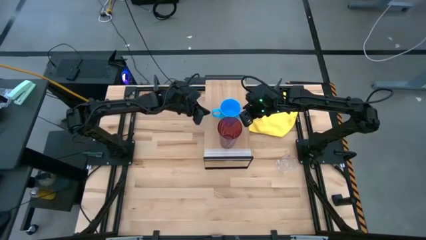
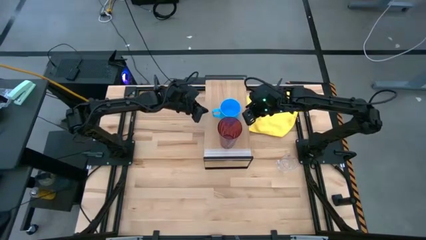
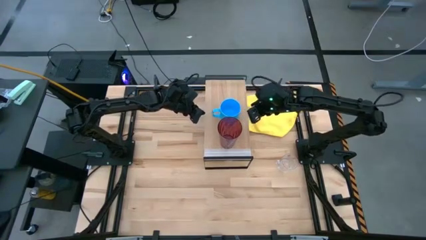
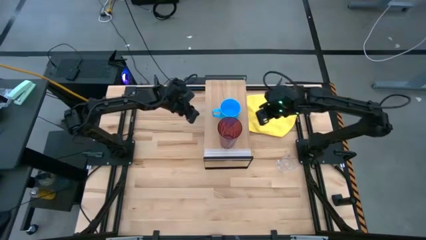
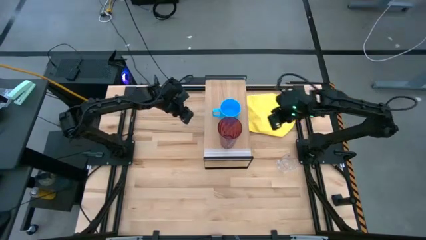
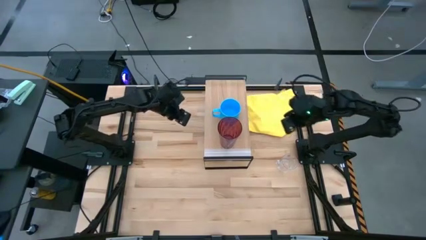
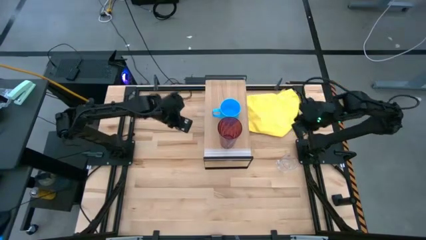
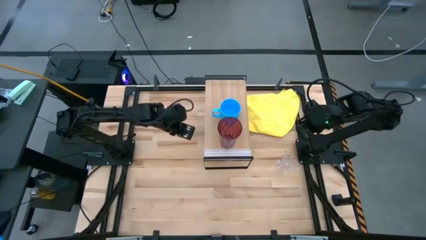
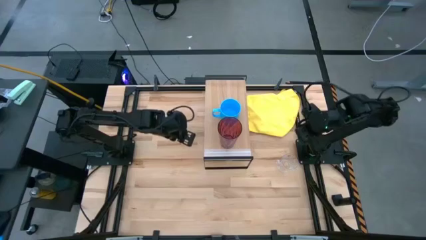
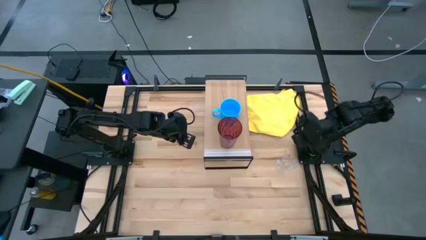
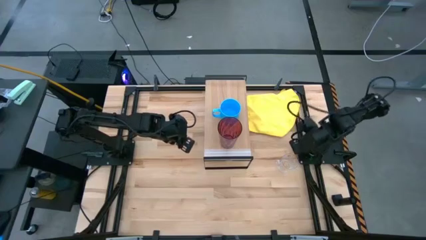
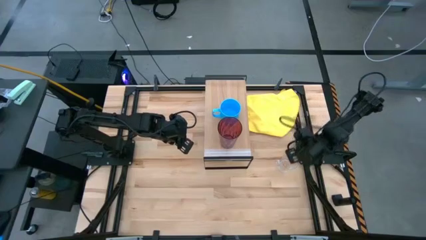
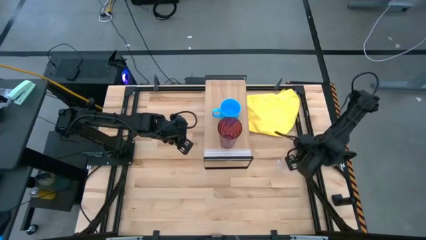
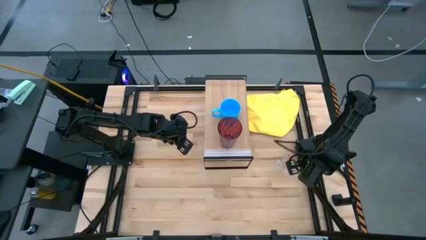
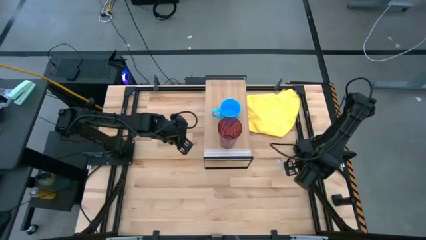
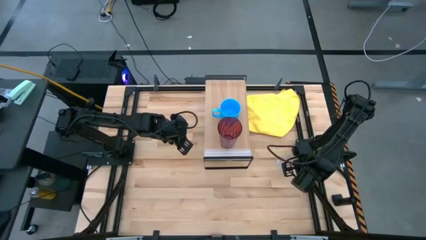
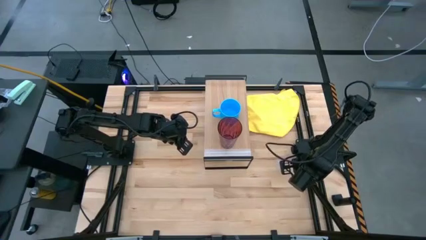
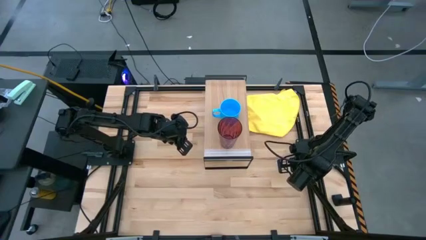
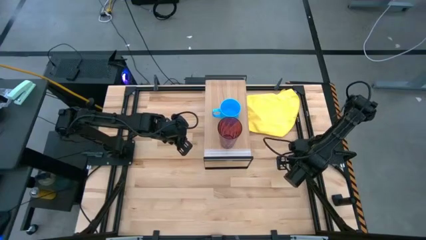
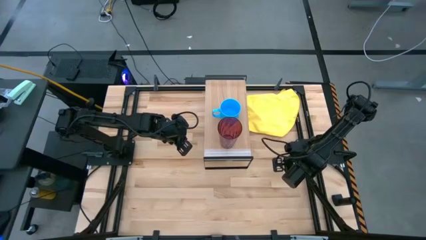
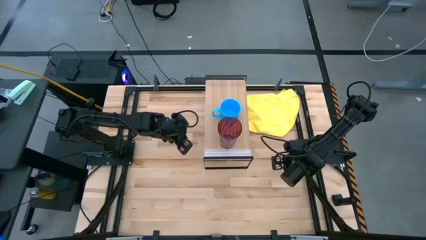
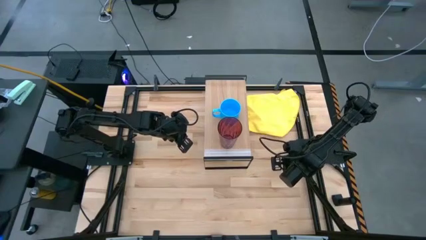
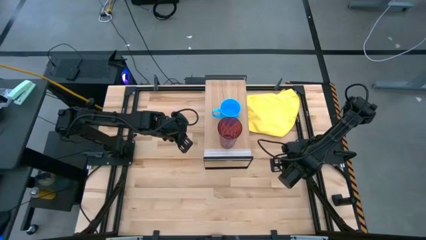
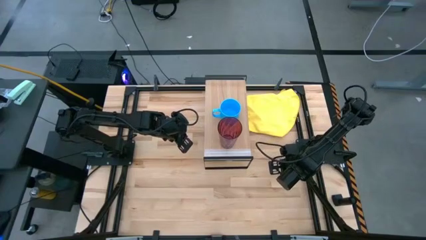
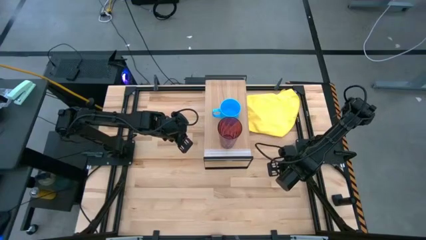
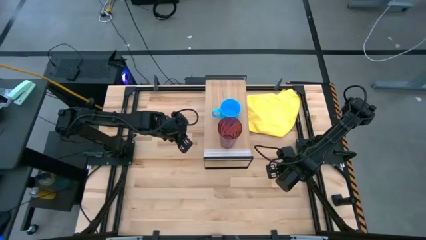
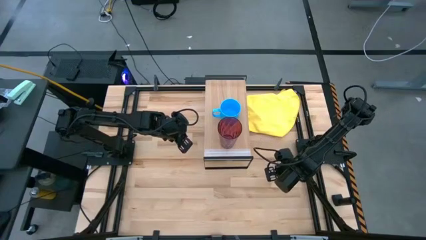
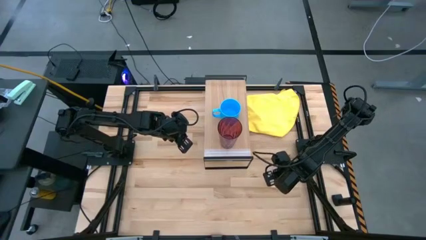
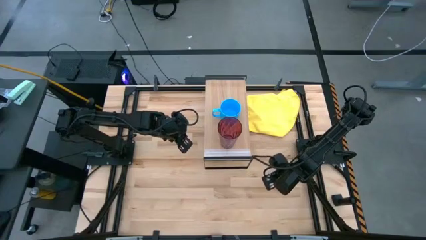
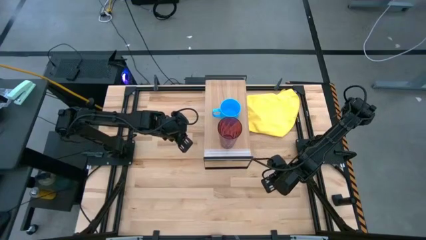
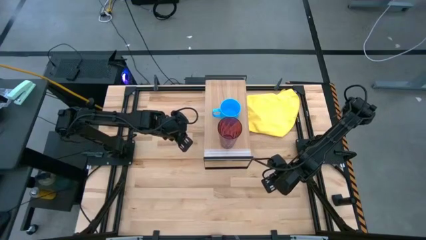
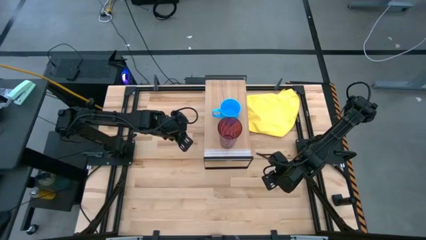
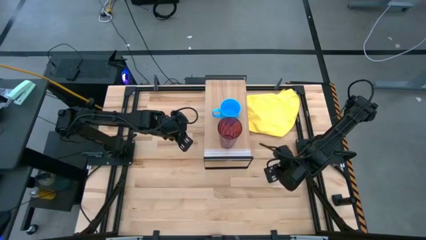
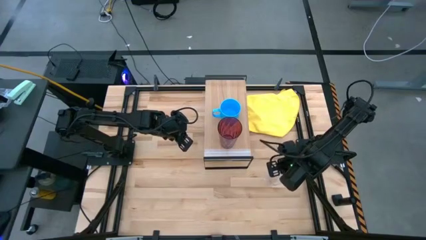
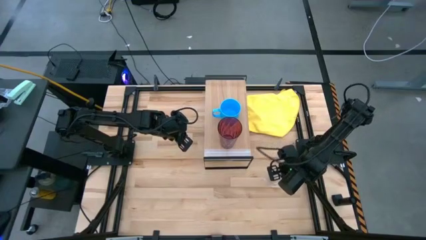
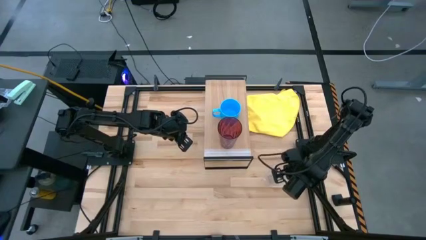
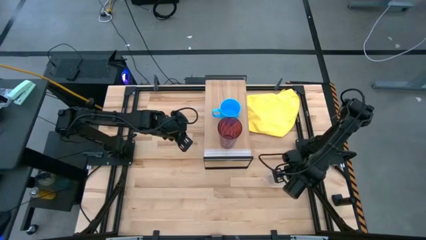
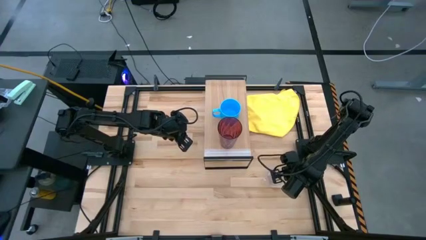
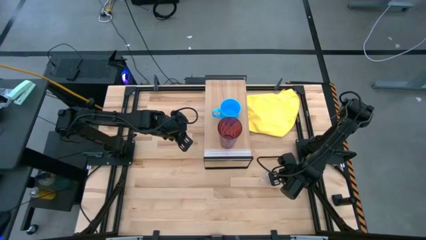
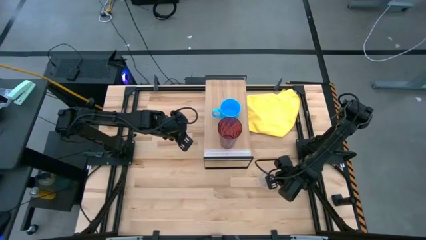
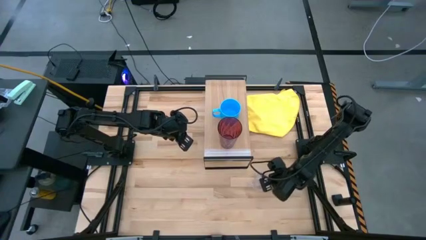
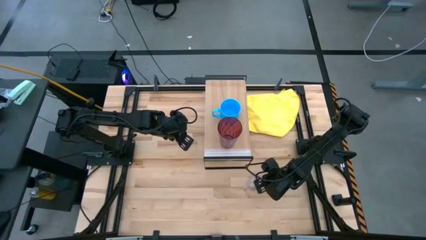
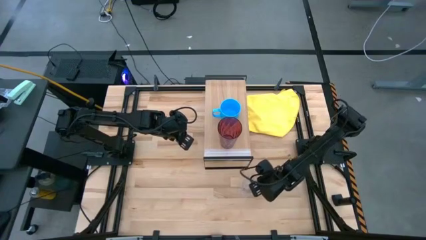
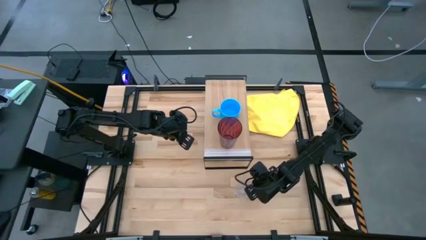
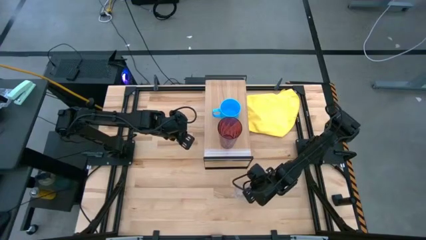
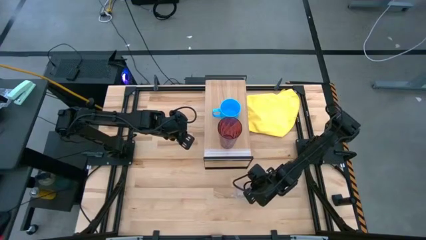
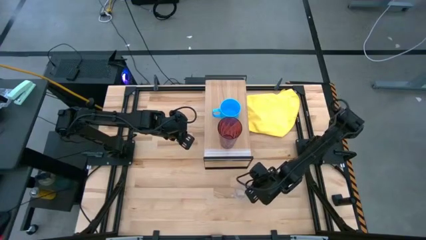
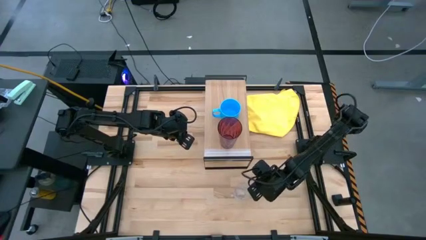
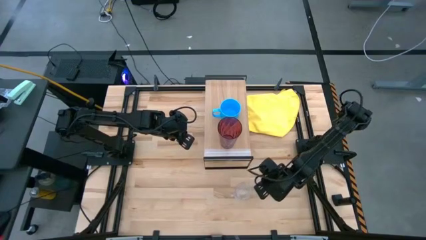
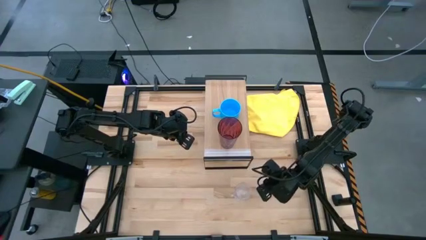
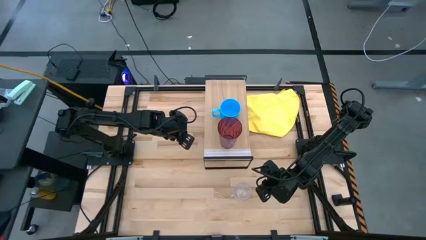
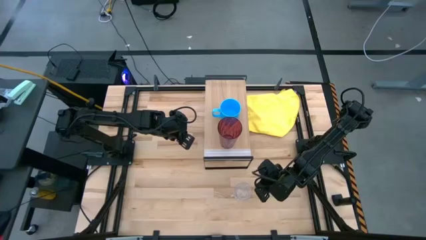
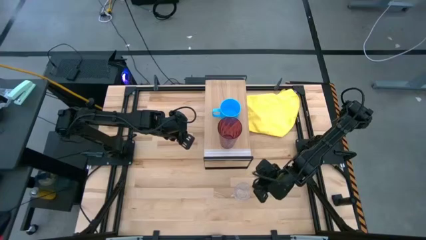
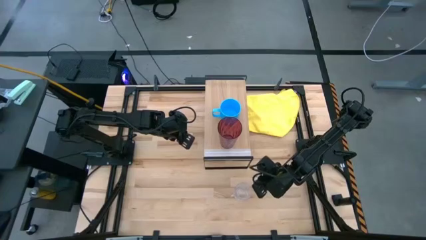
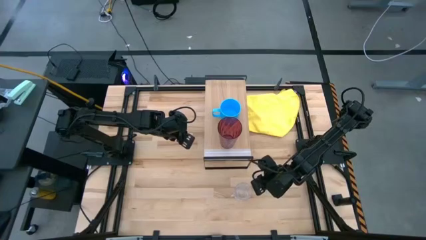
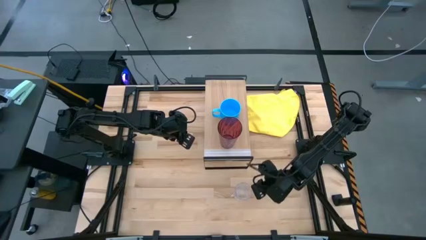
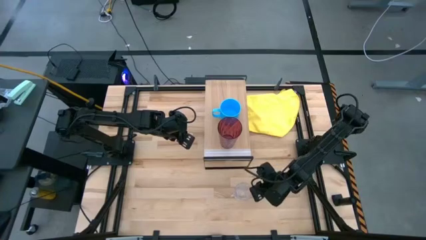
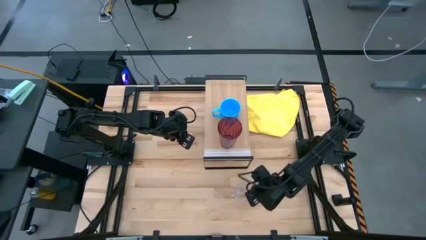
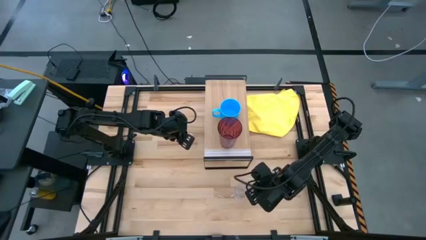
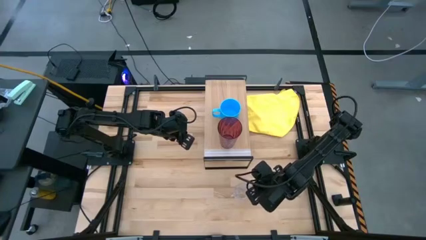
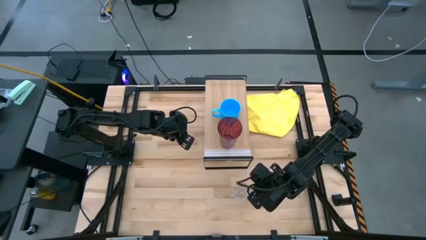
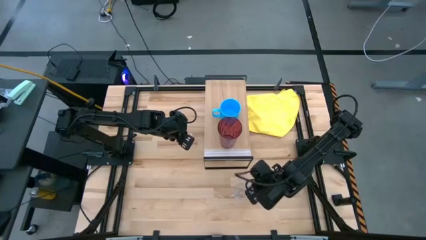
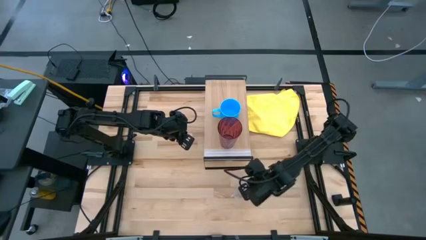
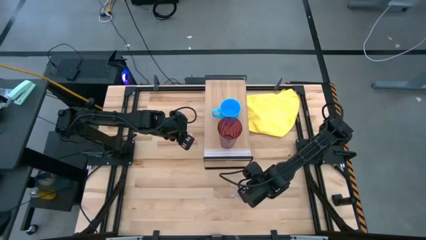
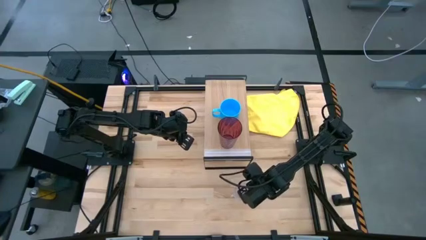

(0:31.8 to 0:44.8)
Task: Stack small to large cups/mugs on shelf
Put the transparent mug on the shelf

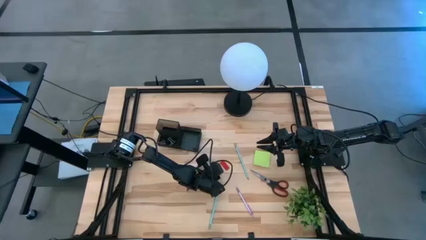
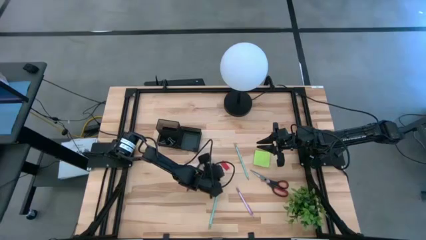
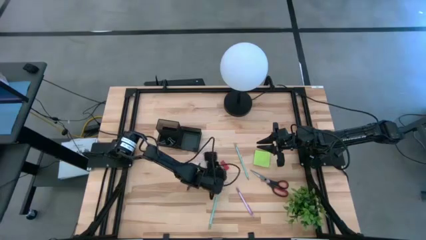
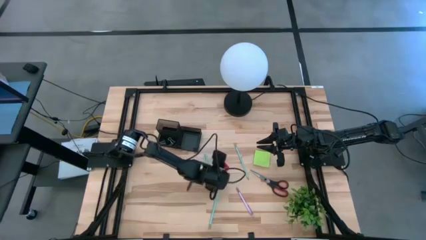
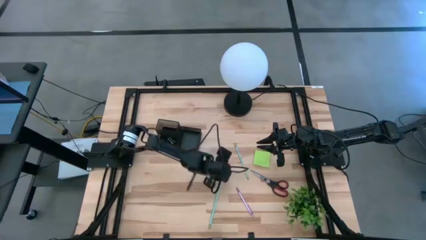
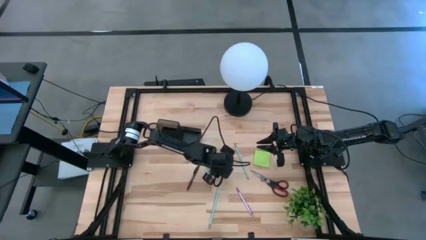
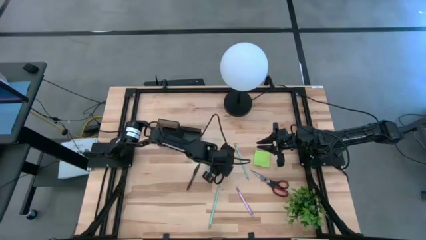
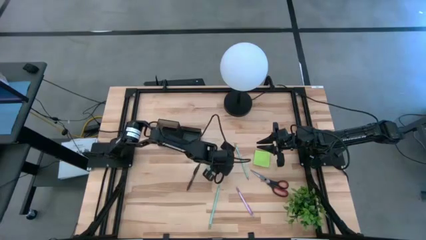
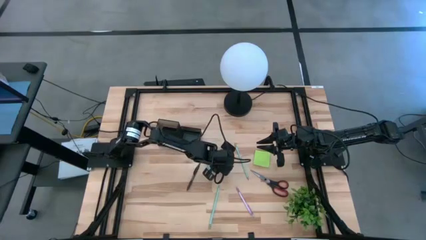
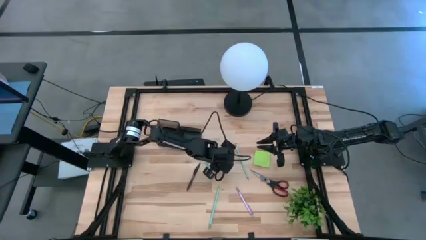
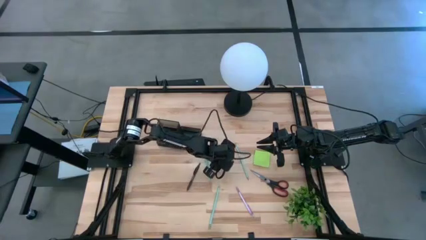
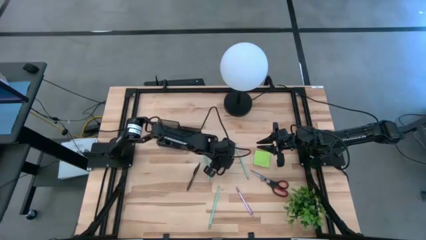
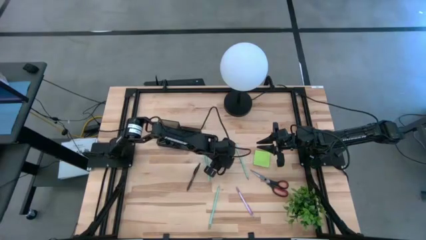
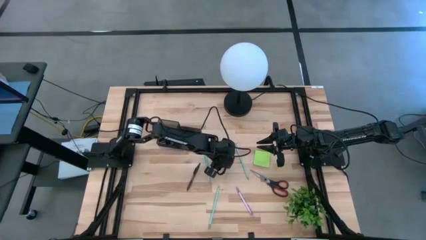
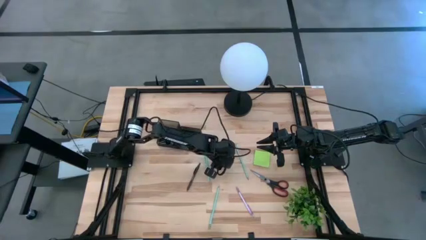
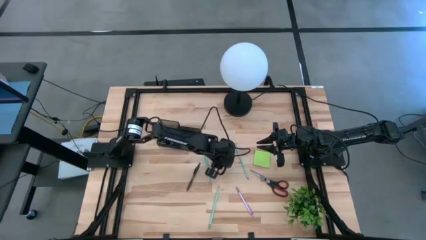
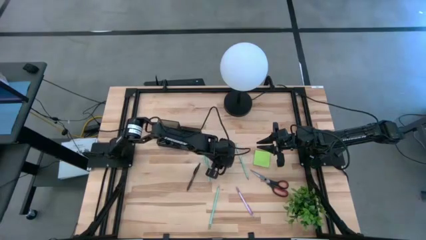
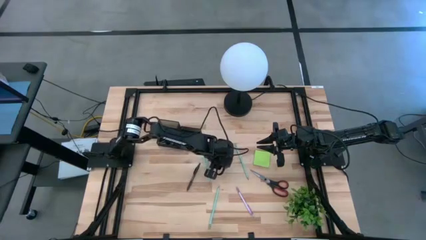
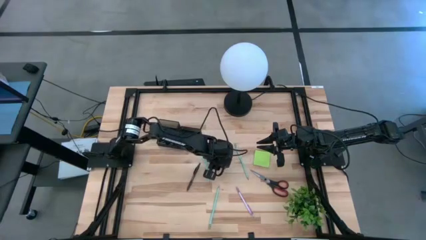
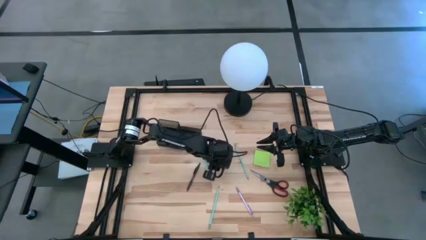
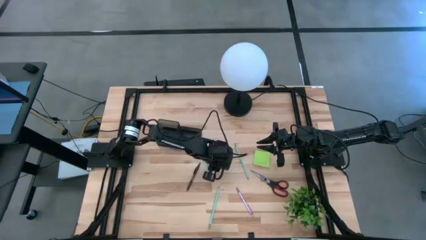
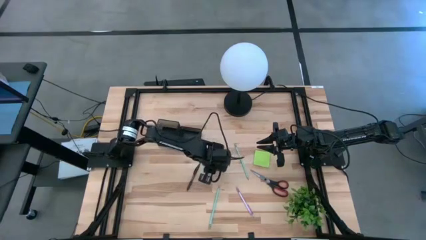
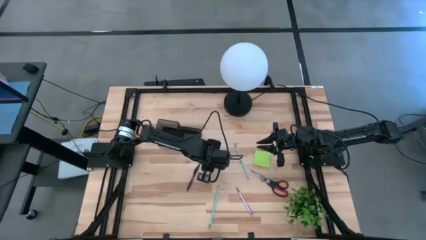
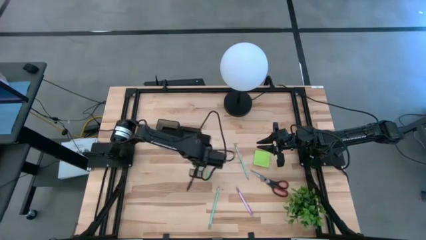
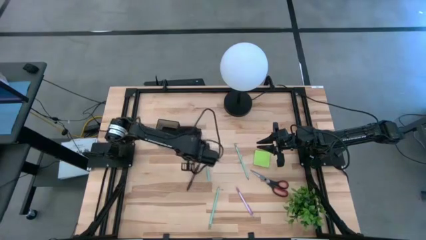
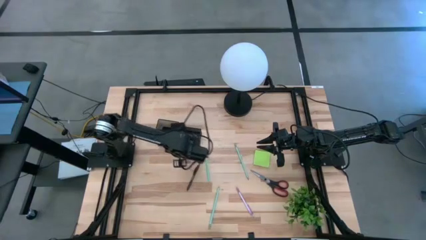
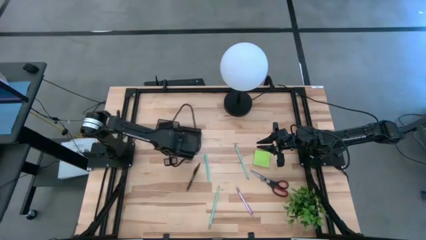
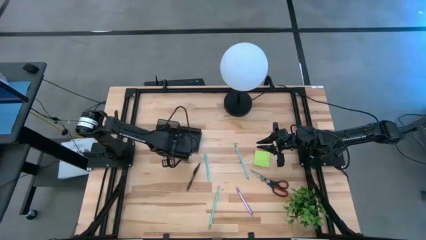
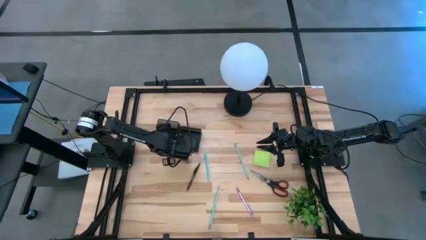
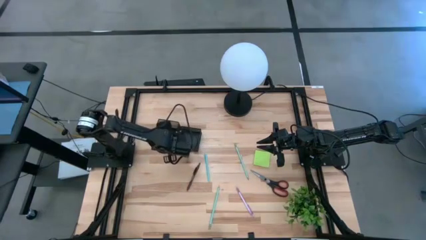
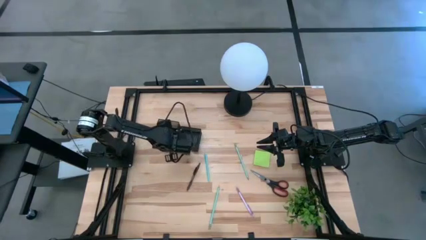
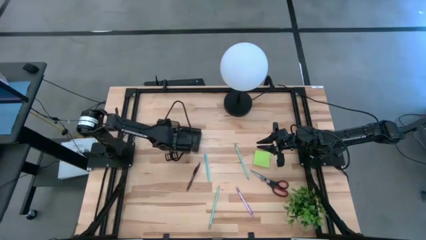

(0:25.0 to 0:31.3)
Task: Pick and place office supplies into organizer
Put the red eraser into the black desk organizer
